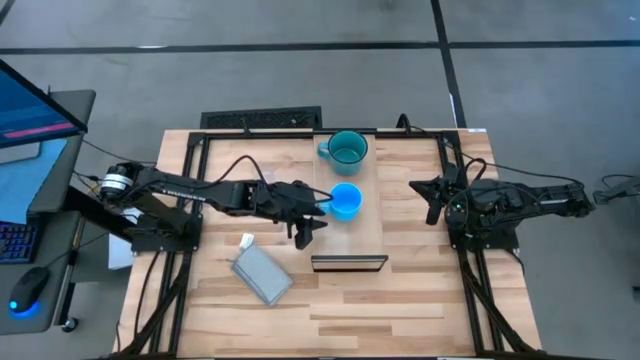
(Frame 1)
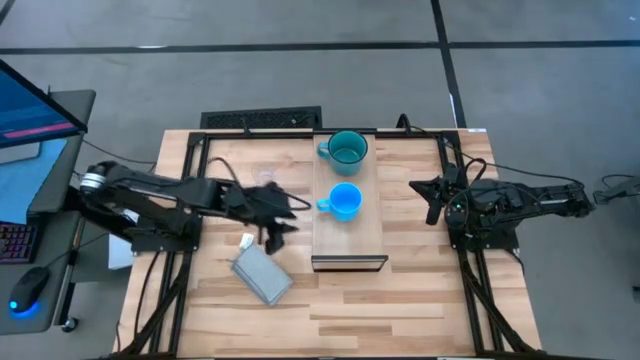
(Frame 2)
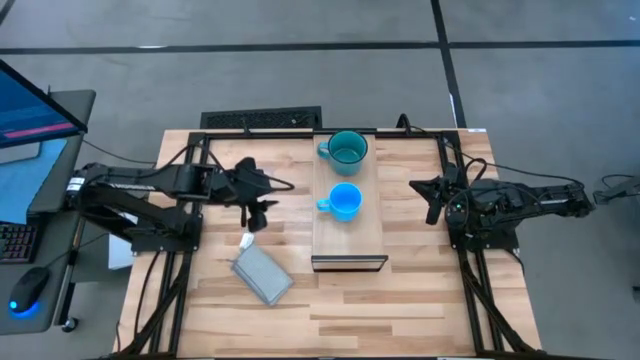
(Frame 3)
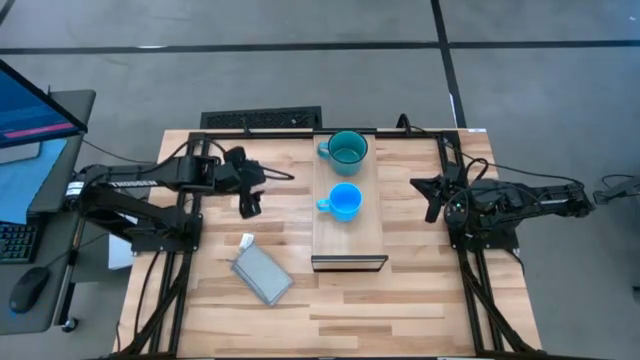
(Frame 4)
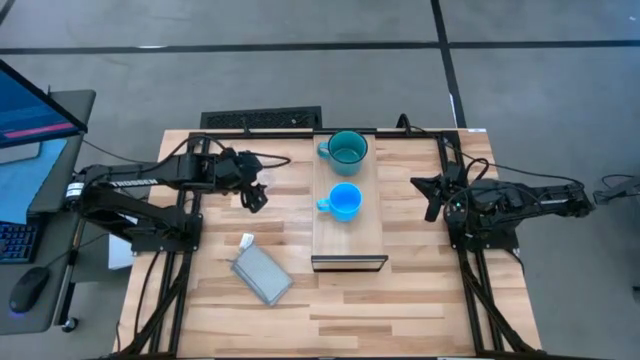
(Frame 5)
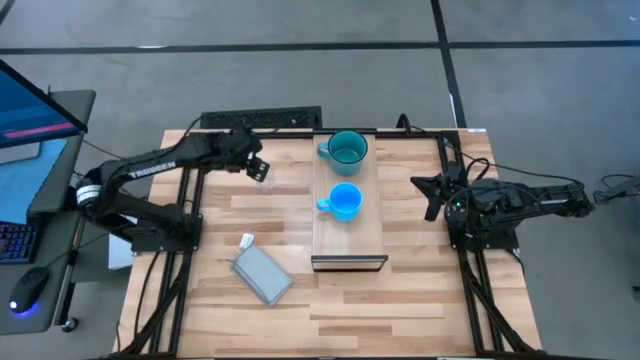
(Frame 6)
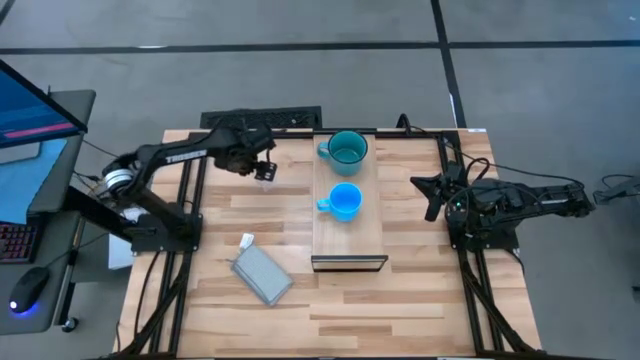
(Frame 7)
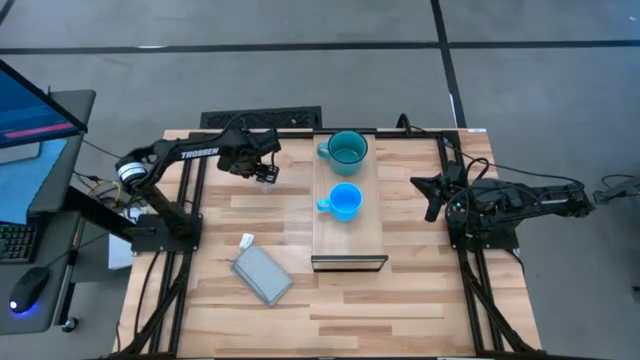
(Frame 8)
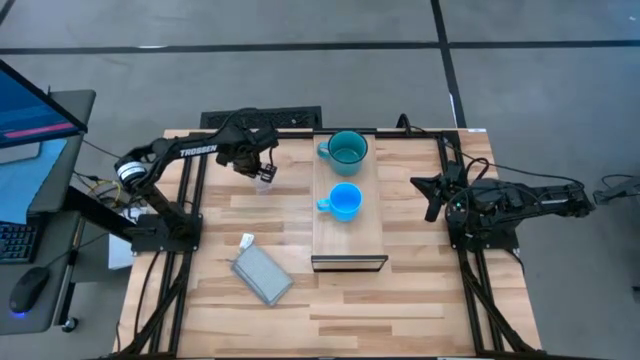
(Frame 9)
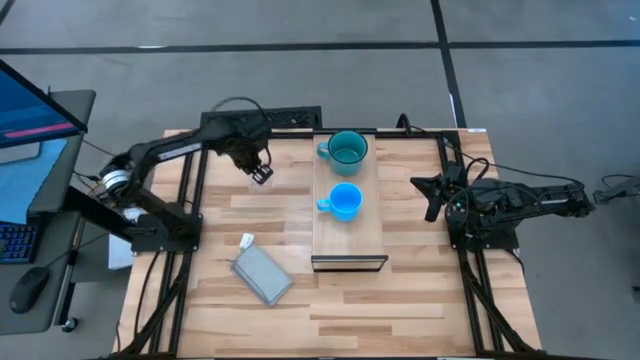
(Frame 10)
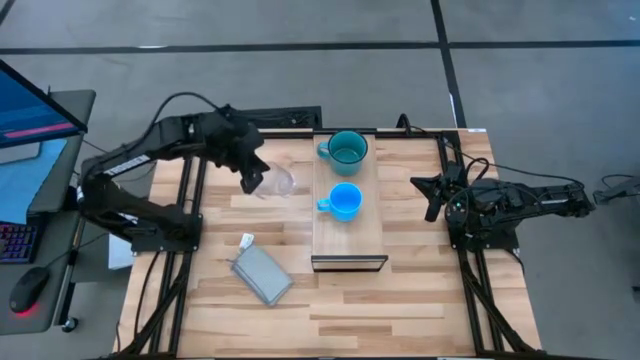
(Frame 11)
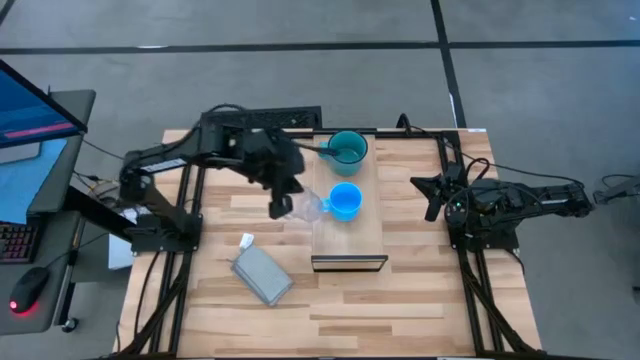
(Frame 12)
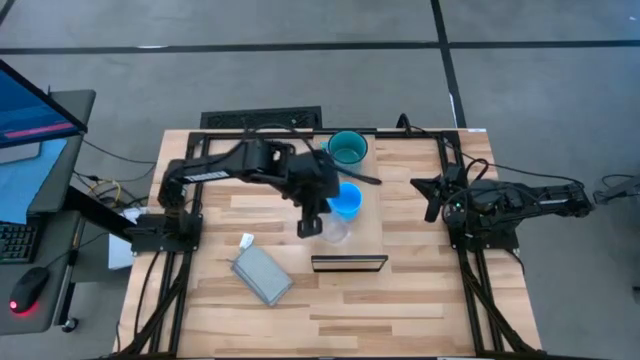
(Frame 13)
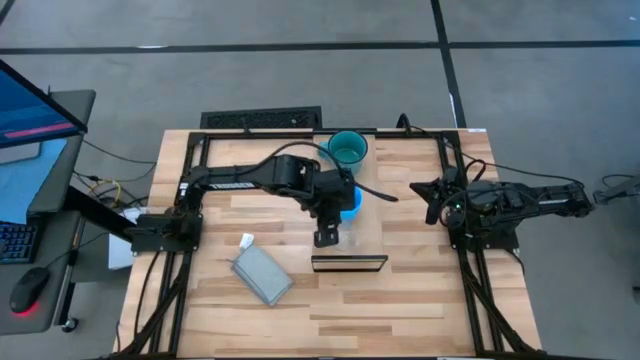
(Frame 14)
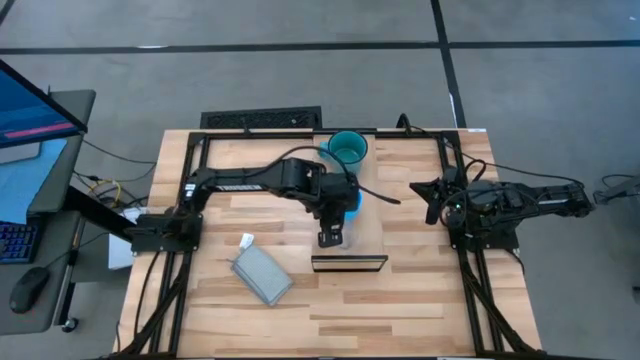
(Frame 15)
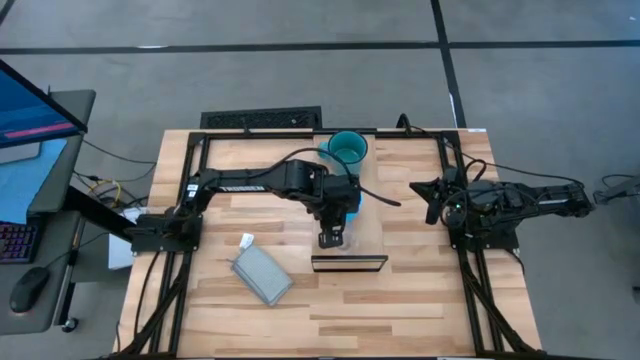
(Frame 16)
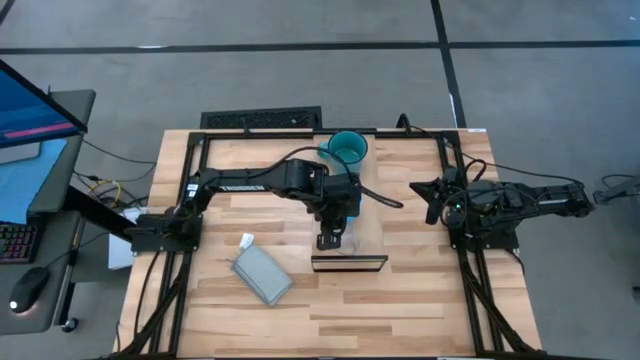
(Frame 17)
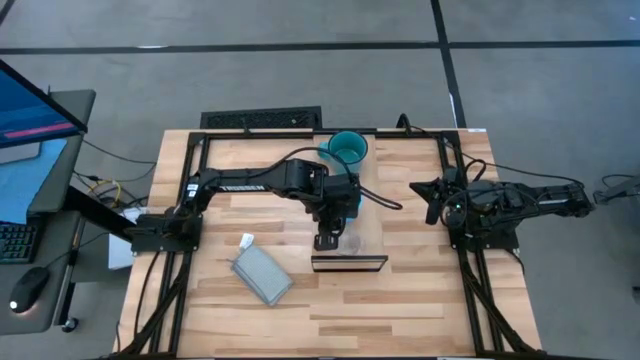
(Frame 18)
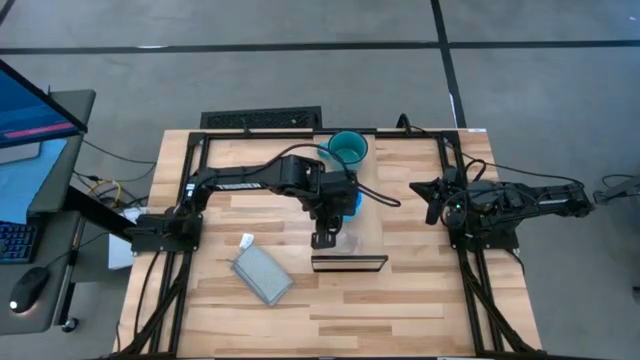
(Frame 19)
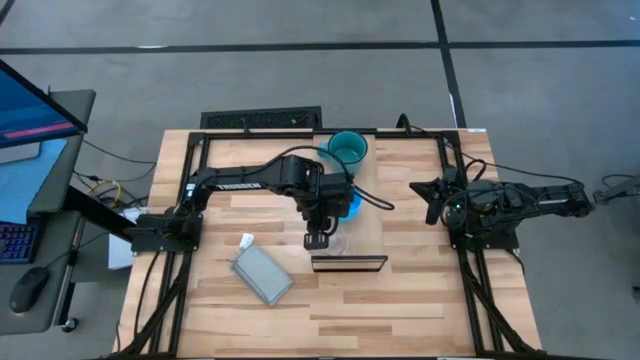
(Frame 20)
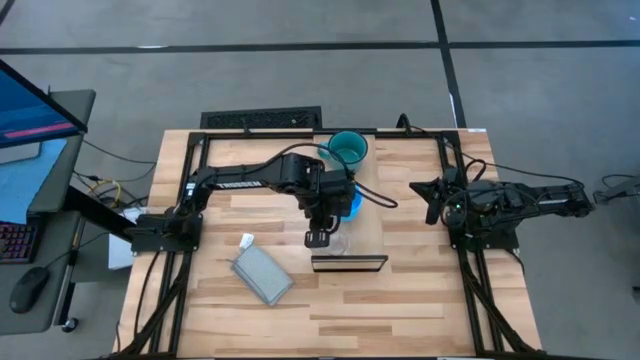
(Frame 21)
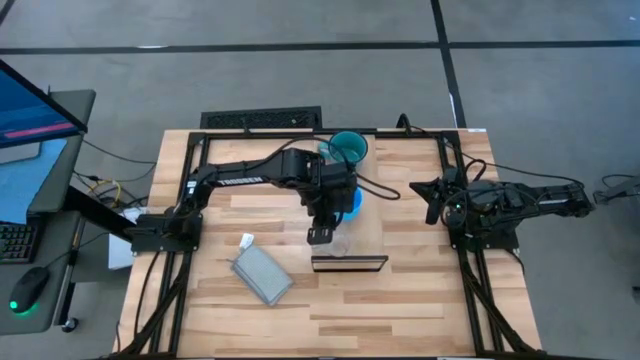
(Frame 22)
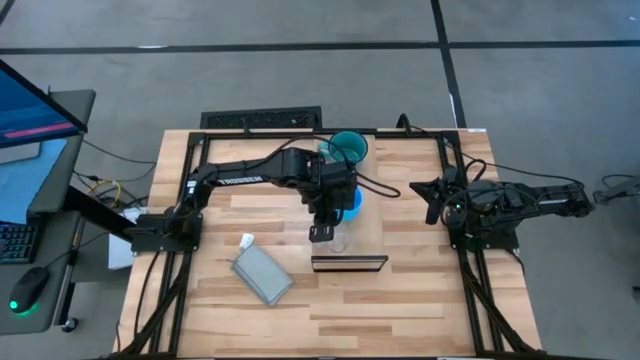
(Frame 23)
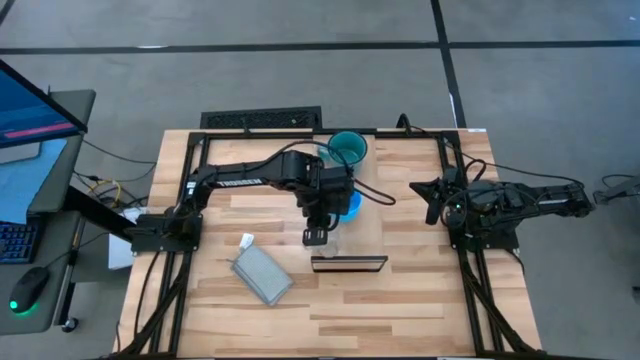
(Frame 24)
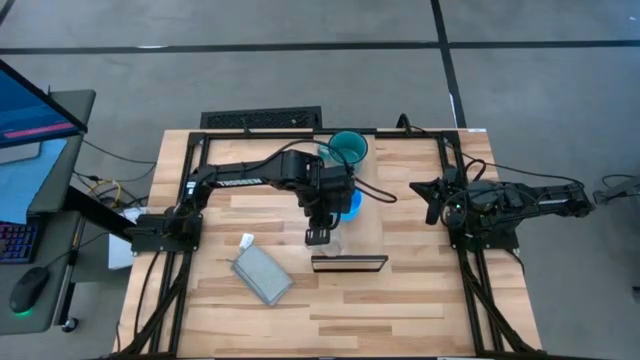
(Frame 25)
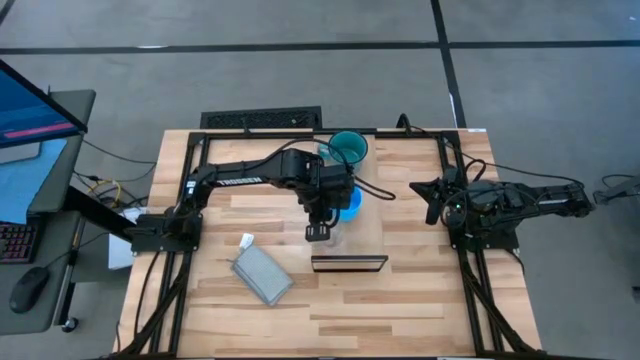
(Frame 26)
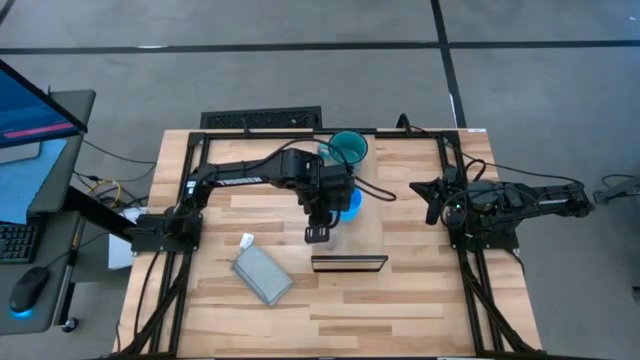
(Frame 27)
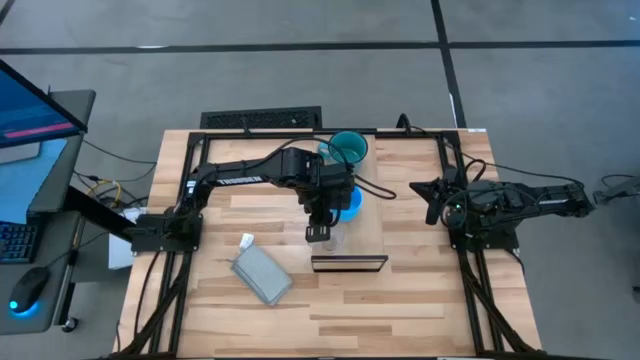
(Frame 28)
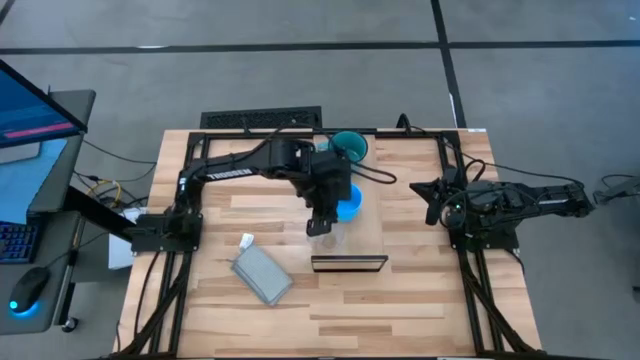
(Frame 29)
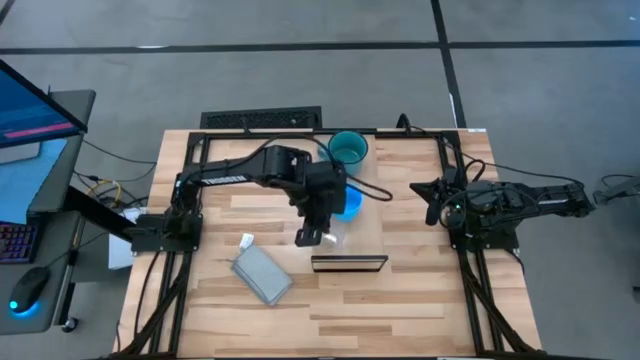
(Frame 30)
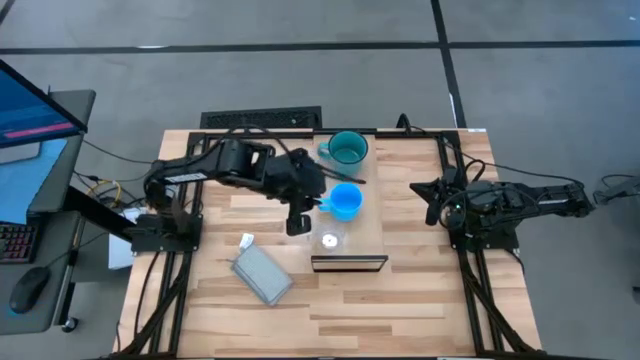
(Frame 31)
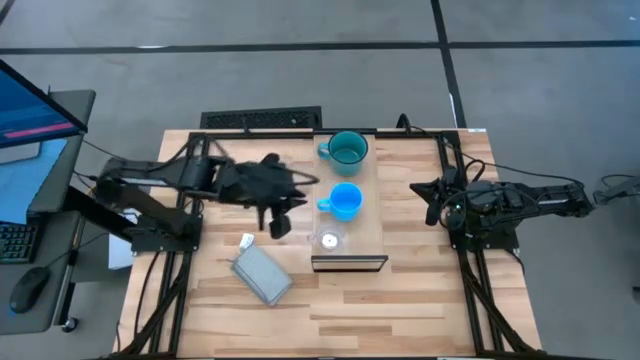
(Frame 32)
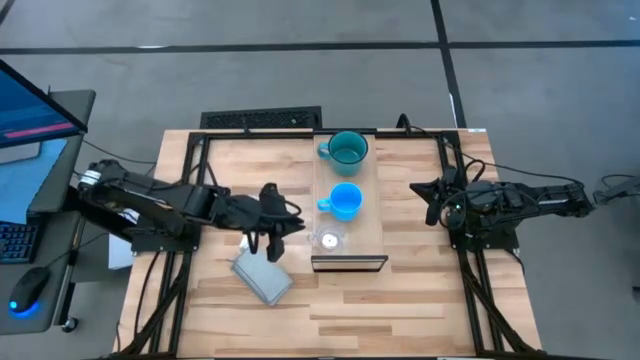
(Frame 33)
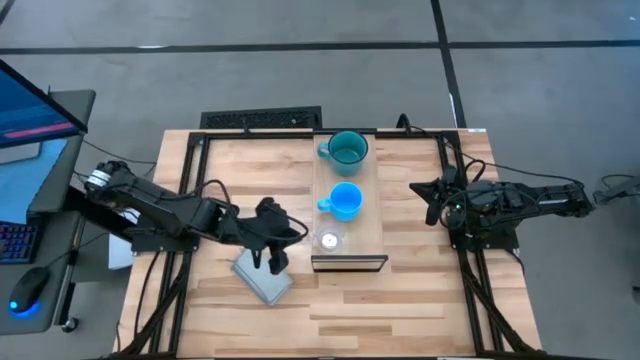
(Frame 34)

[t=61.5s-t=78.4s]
Task: Stack small to large cups/mugs on shelf
Put the transparent mug on the shelf
